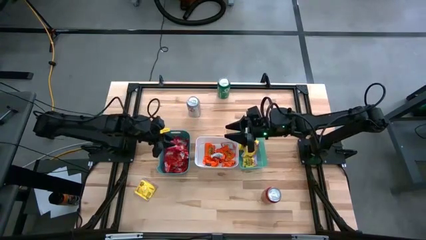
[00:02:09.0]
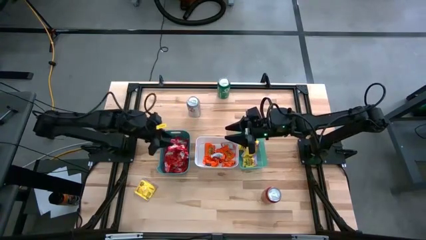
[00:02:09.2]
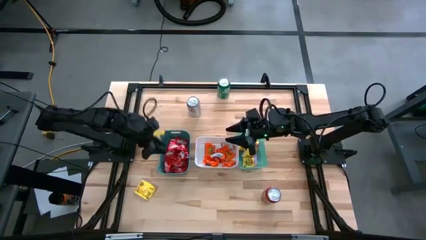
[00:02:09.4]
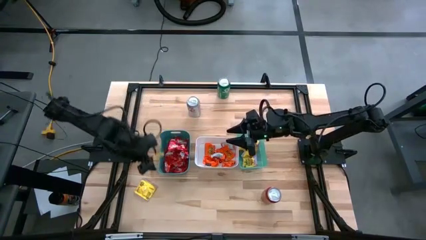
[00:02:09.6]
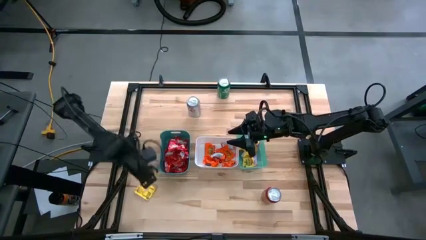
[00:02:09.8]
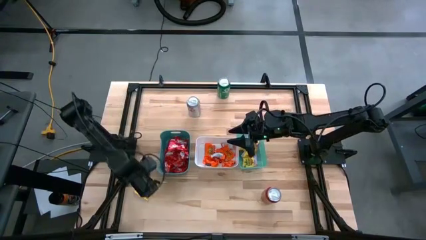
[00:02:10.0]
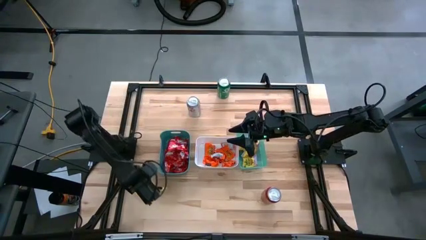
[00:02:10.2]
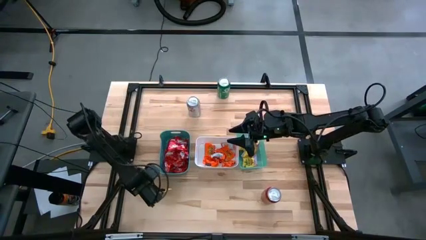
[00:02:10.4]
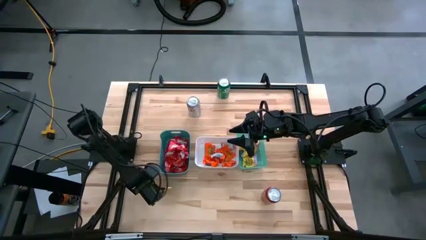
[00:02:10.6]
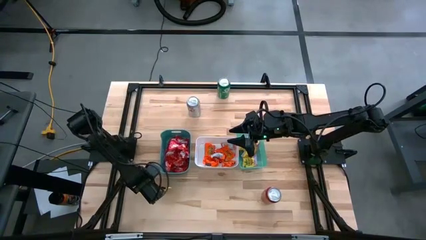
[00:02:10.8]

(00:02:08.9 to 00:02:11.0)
Task: Sort candy
Put the yellow candy into the light green bin

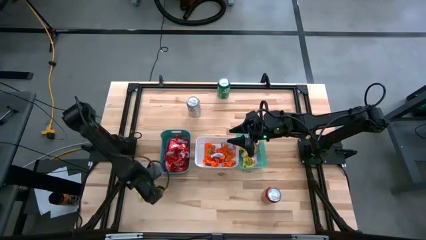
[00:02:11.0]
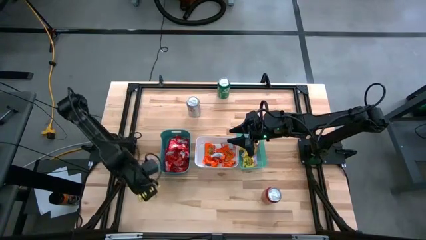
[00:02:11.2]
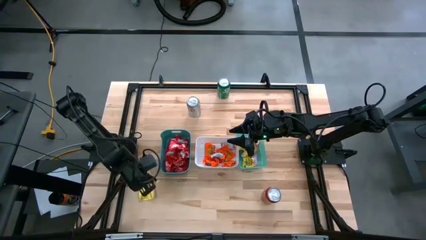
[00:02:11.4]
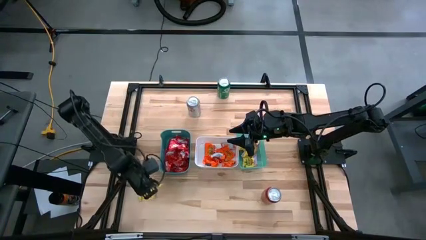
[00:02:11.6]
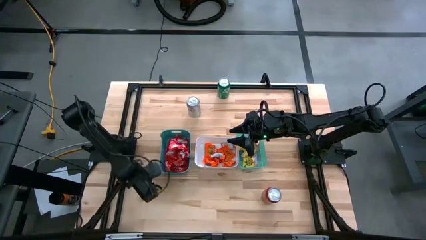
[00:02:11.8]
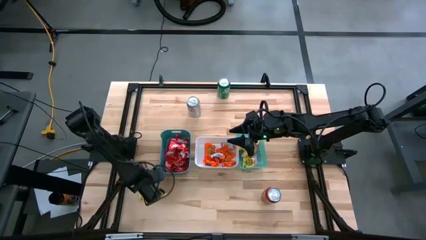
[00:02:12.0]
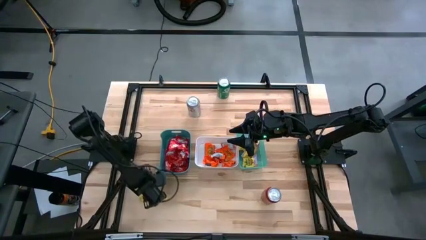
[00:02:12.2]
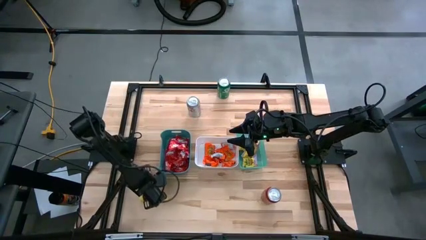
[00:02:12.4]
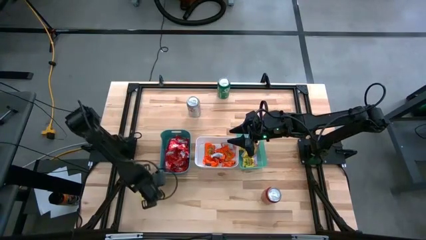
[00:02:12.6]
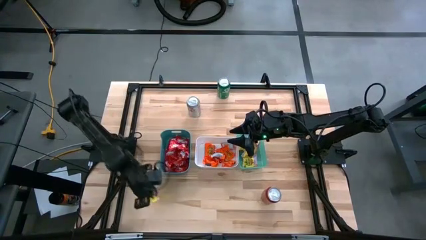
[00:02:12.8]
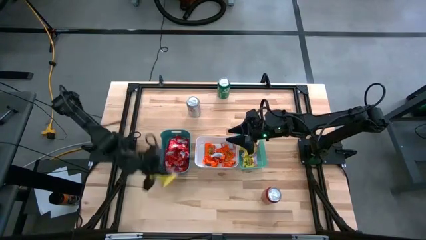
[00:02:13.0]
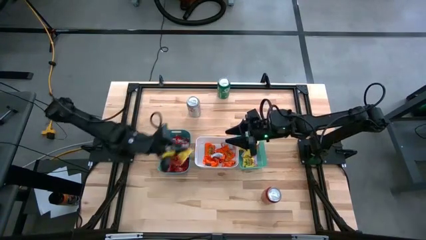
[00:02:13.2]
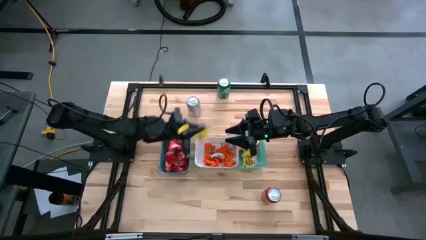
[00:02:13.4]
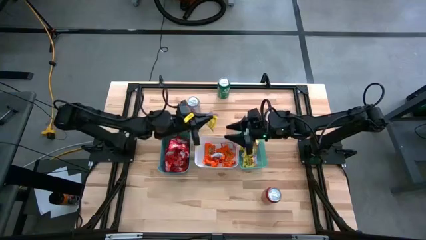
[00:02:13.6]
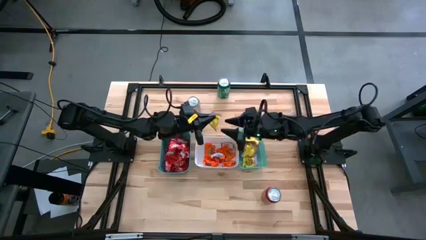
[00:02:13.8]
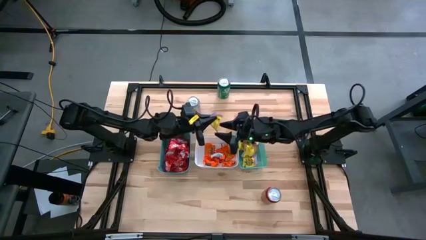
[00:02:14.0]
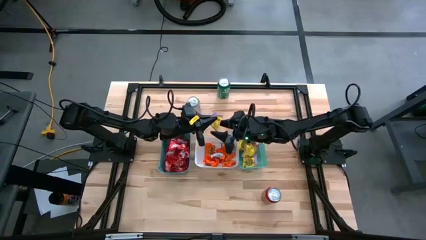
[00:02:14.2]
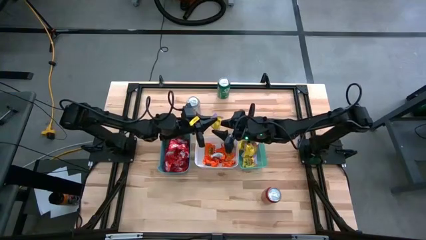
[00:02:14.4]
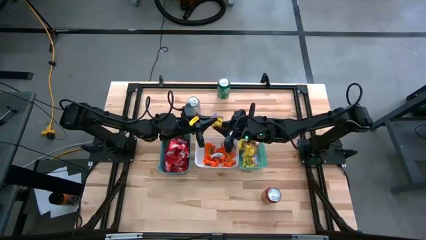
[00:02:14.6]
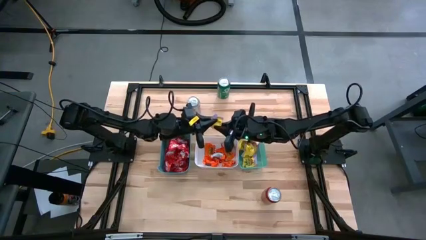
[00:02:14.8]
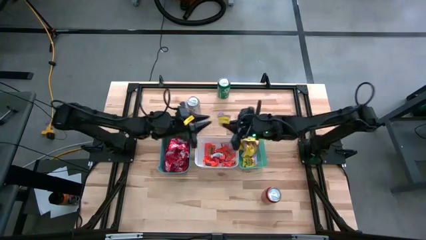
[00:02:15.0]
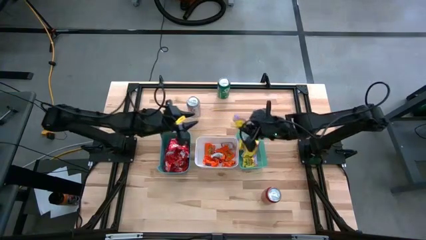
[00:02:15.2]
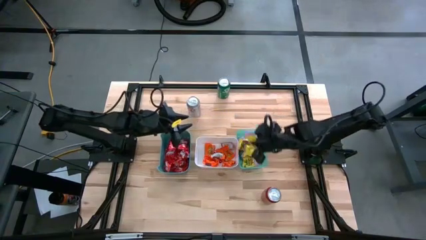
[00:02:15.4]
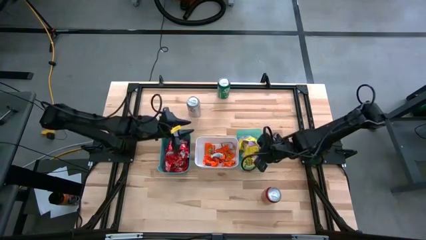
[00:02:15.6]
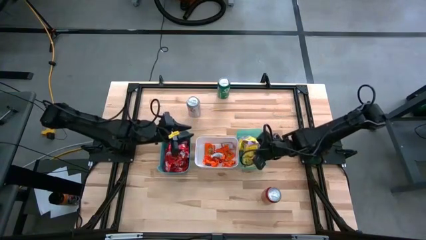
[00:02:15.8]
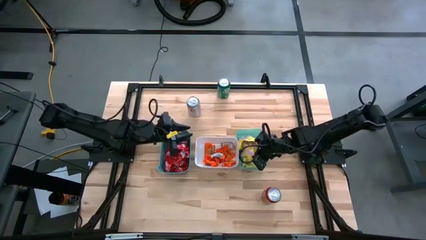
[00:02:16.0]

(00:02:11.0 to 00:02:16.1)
Put the yellow candy into the light green bin

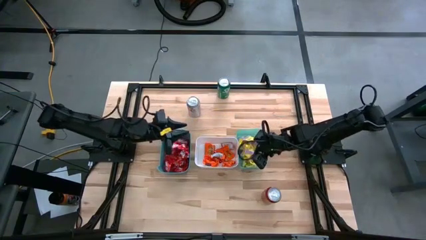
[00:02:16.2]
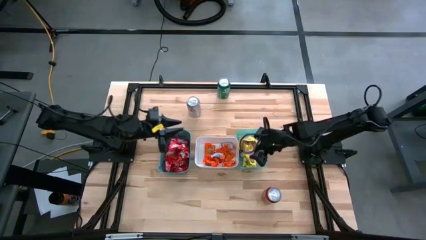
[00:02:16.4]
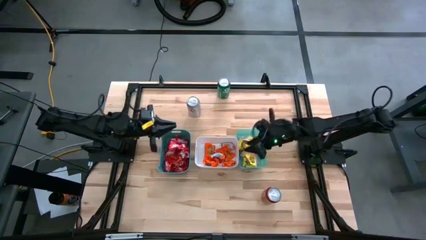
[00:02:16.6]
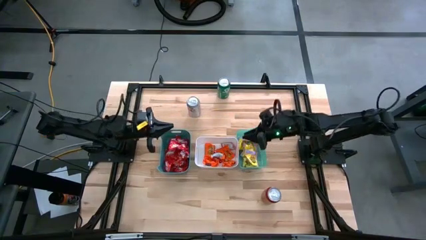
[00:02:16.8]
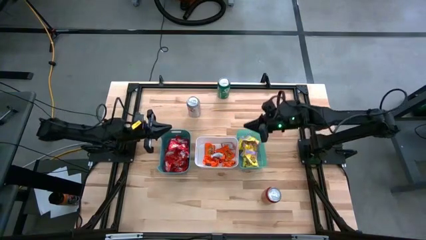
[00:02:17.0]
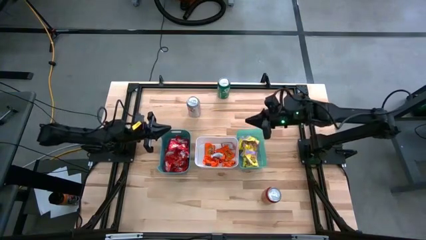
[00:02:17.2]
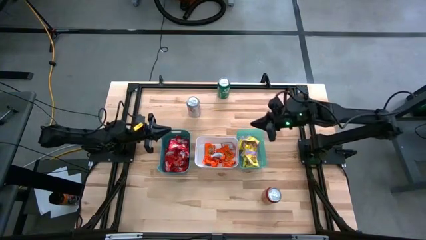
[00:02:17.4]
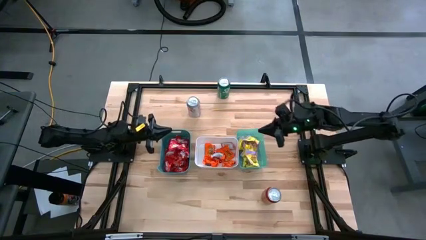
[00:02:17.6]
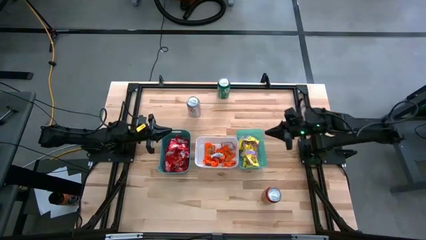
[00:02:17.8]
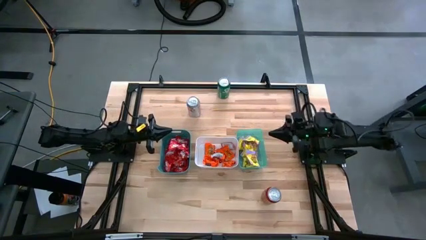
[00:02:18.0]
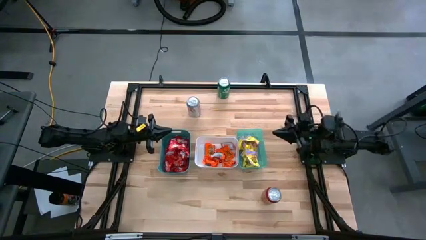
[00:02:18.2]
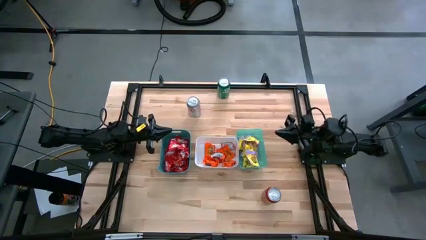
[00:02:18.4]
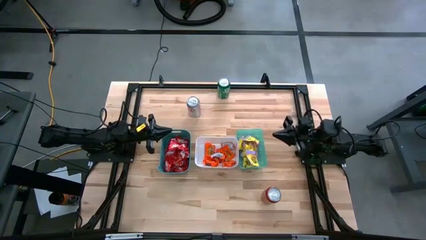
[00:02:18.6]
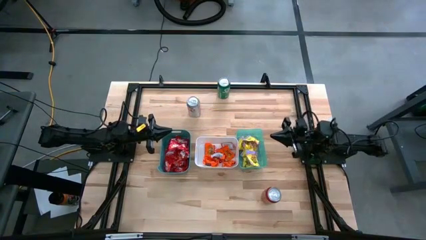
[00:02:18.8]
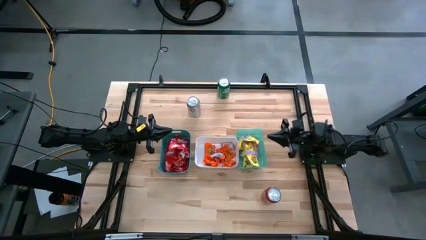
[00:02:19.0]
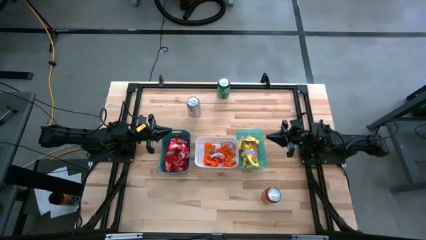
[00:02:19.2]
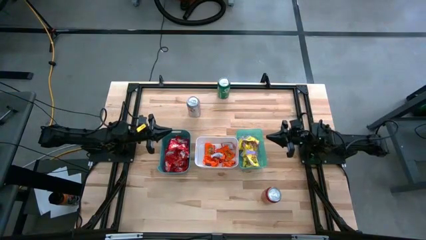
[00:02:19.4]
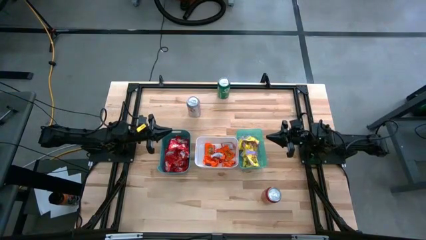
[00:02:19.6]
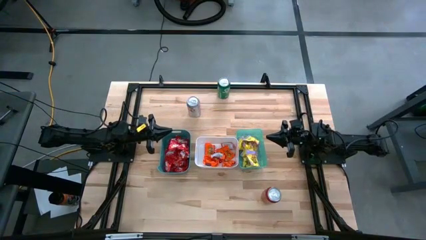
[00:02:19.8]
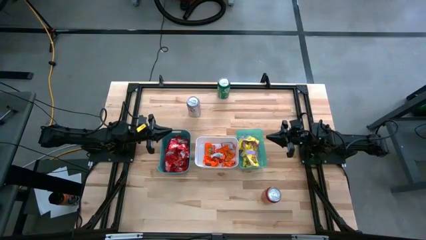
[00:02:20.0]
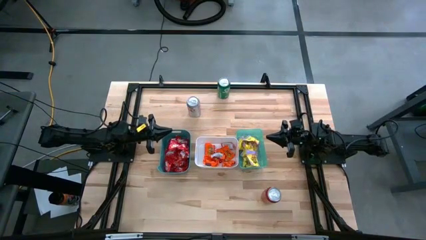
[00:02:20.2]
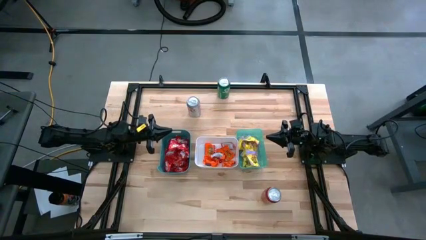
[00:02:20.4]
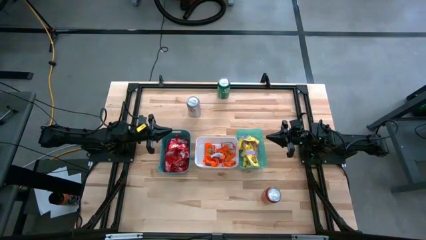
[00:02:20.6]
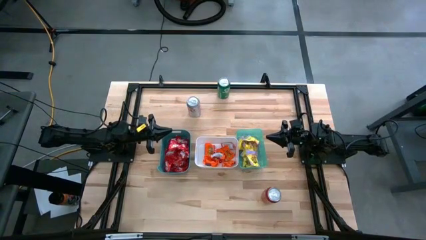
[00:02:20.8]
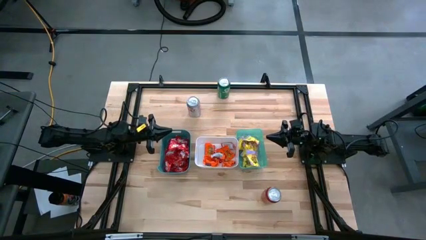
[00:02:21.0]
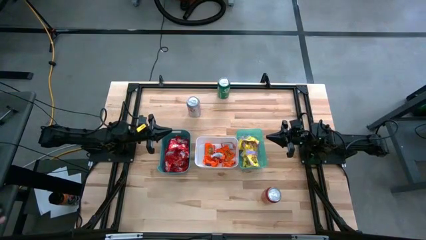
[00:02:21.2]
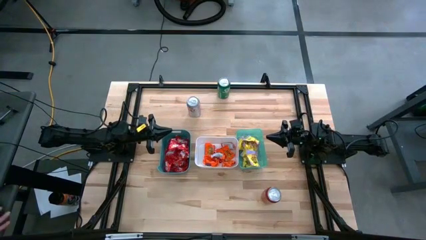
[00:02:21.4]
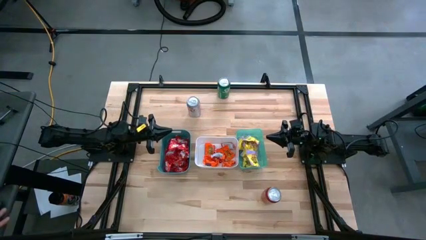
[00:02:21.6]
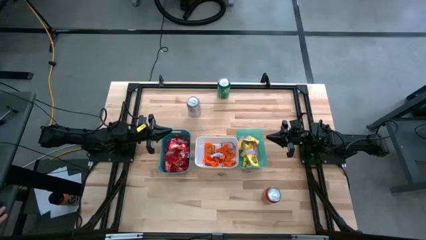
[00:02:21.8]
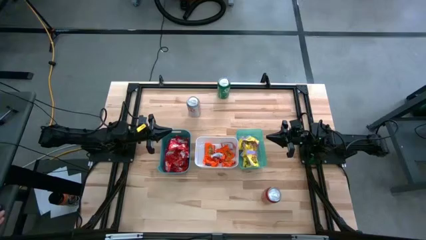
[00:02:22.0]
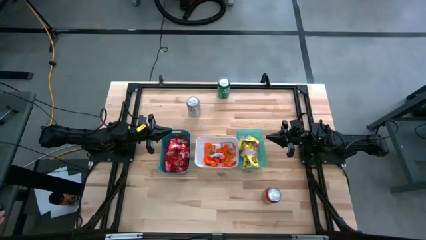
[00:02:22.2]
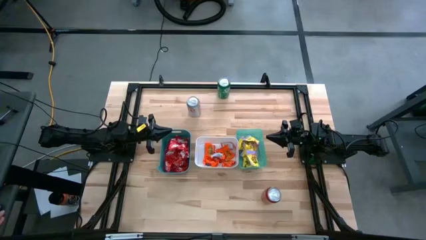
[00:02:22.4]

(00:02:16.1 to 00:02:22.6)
Return to Home Position

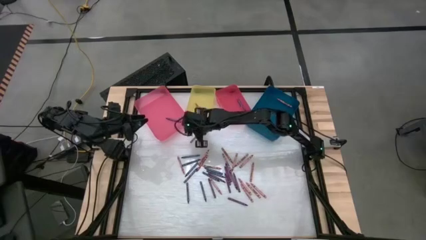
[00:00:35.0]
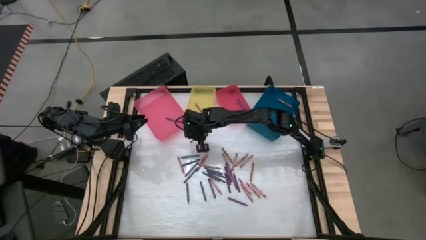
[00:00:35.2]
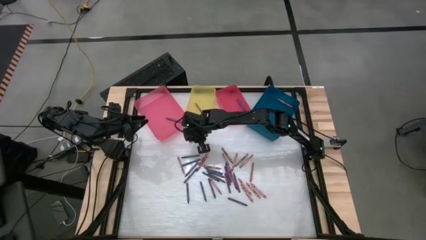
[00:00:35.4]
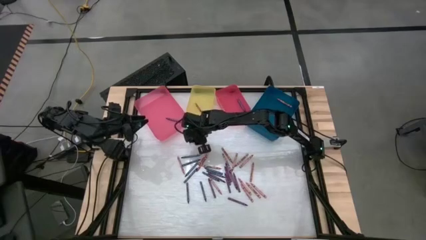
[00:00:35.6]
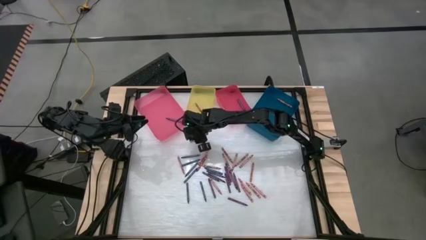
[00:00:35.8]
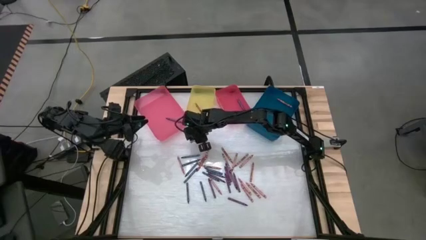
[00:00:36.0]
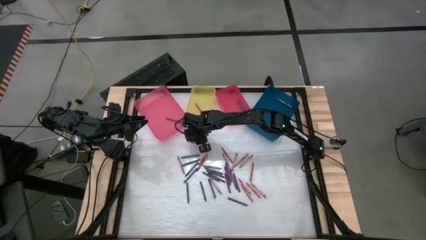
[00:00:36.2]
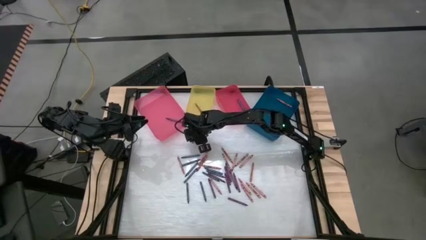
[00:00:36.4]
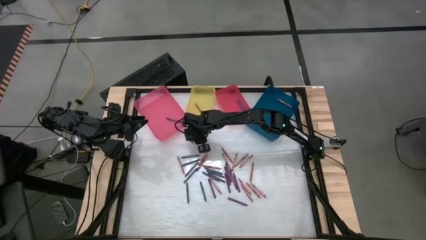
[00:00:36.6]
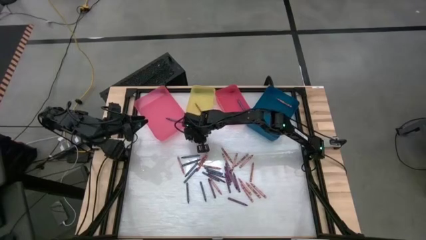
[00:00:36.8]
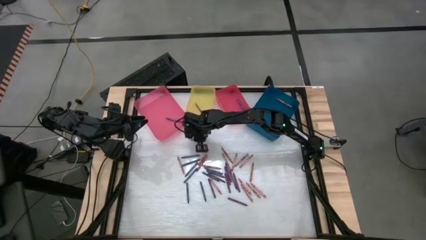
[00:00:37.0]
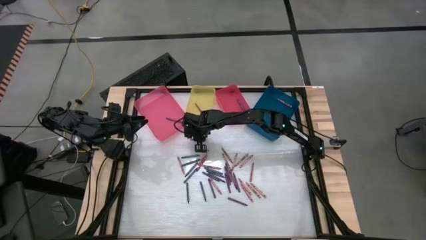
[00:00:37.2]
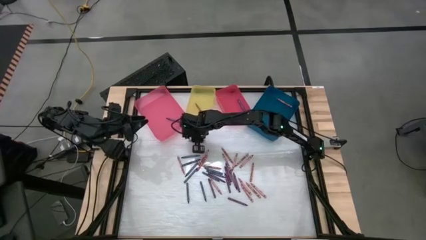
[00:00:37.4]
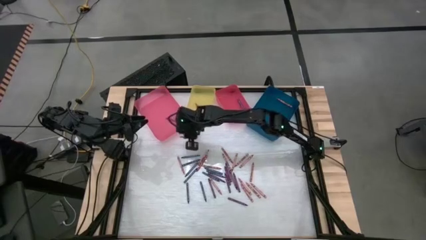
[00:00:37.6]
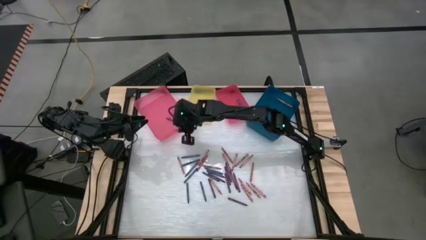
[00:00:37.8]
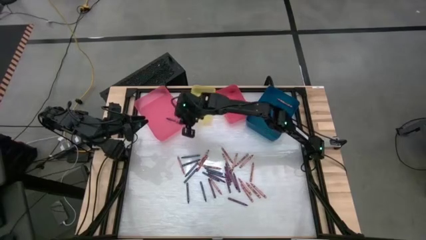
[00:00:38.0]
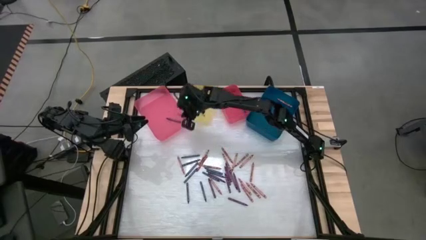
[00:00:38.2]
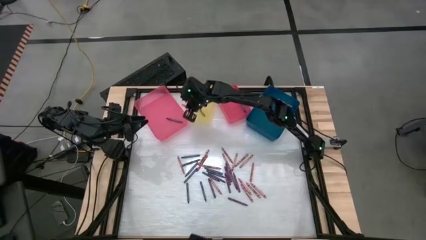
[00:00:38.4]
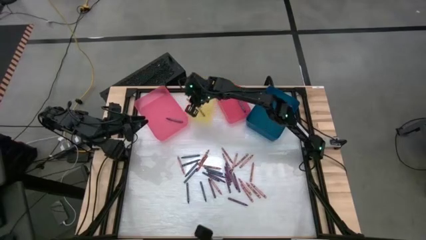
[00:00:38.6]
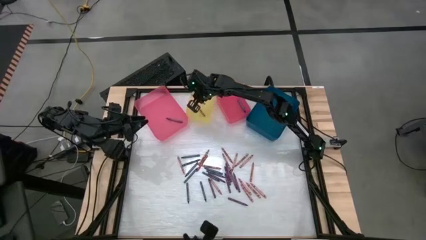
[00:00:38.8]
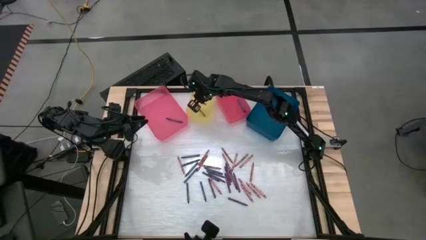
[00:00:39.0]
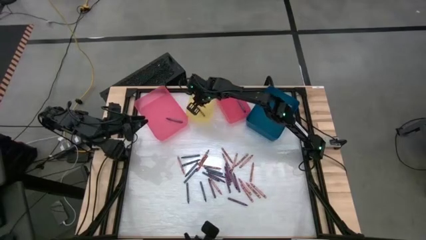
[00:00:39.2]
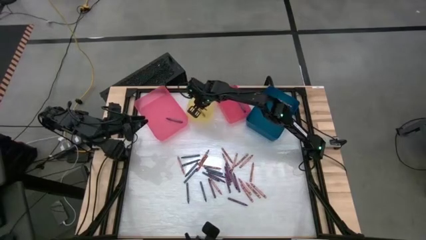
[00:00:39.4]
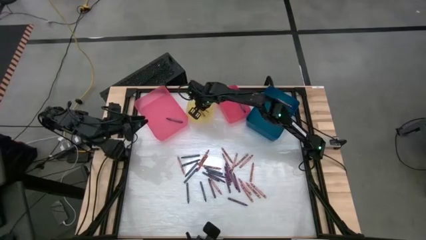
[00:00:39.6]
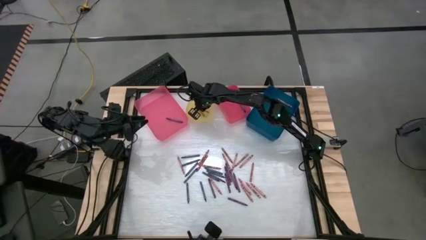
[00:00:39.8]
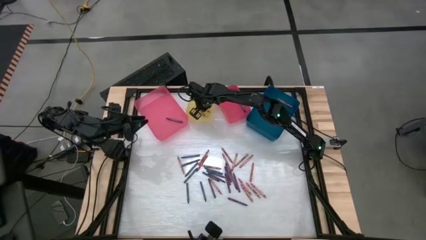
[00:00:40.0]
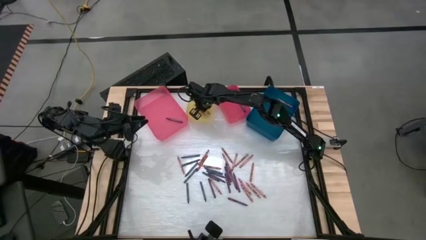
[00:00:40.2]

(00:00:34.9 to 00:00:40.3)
Task: Sort crayons
Put the red crayon in the yellow bin
